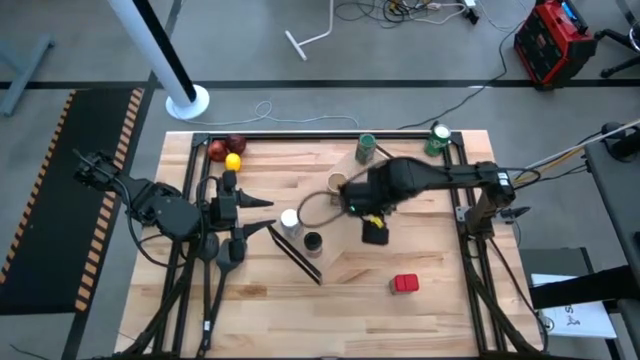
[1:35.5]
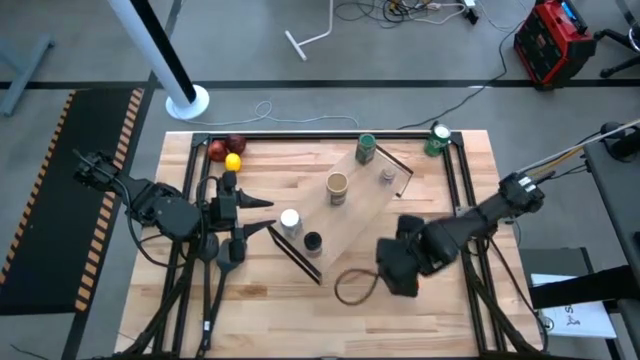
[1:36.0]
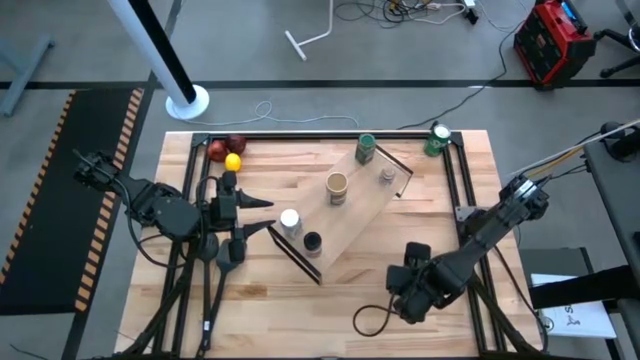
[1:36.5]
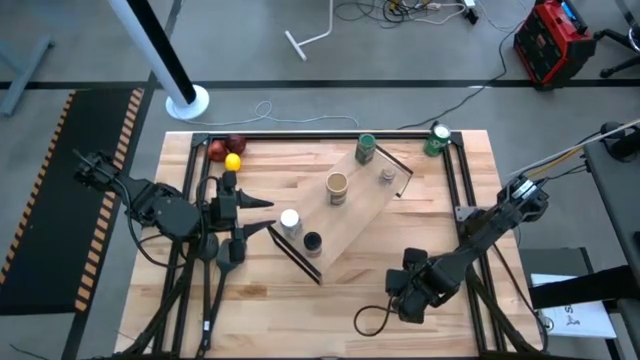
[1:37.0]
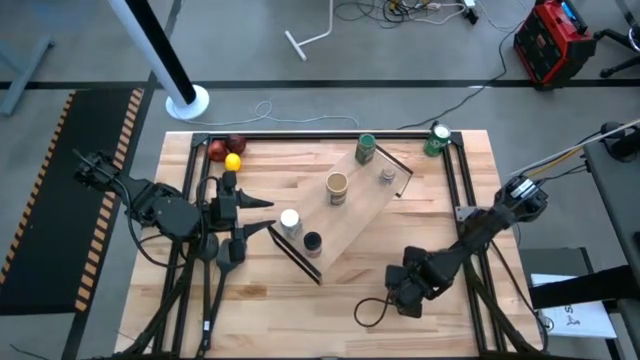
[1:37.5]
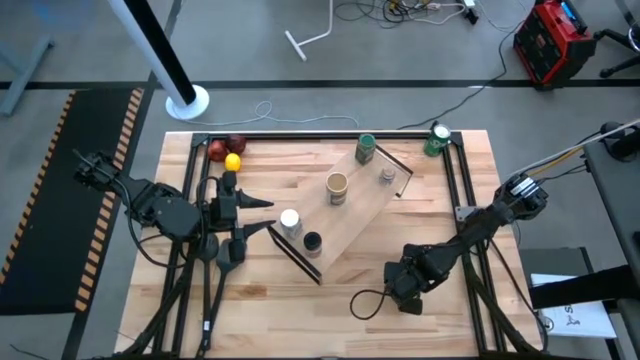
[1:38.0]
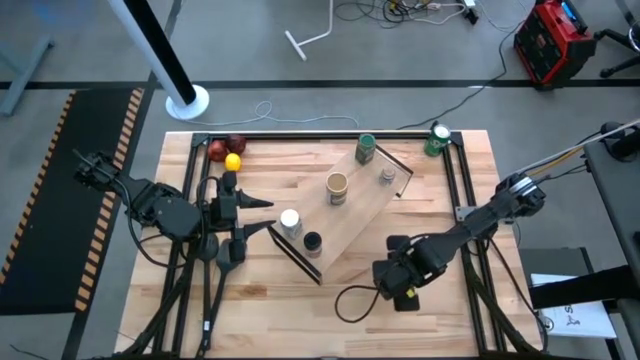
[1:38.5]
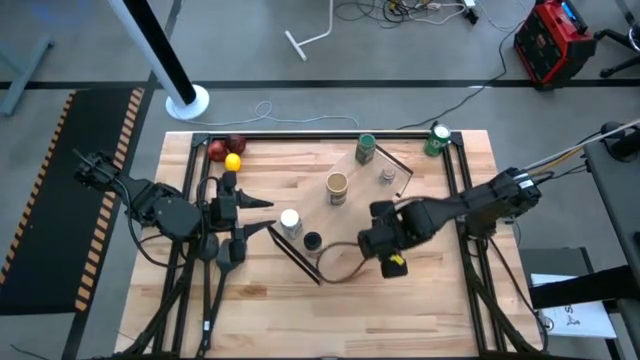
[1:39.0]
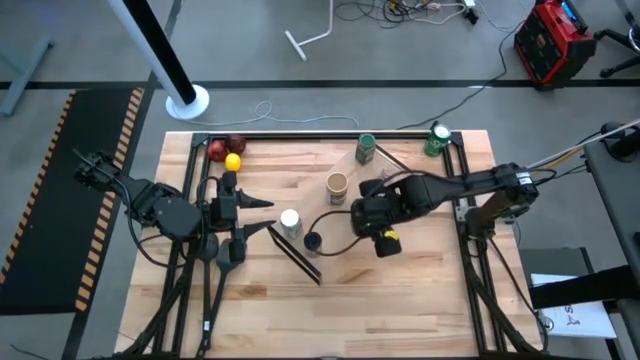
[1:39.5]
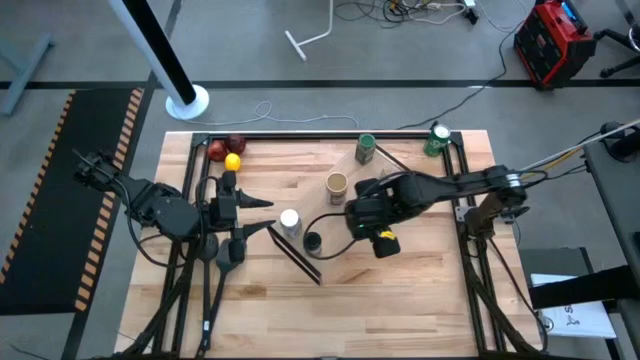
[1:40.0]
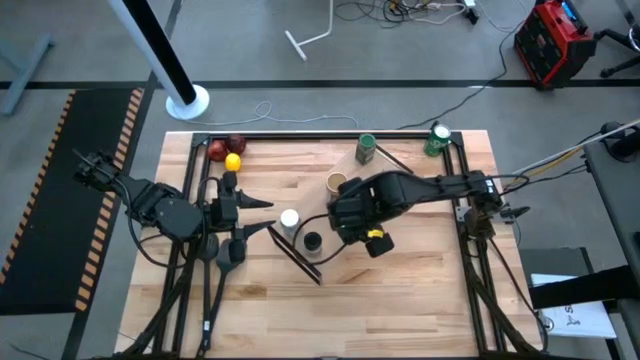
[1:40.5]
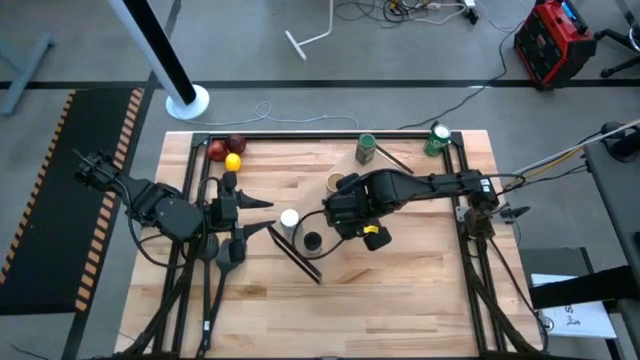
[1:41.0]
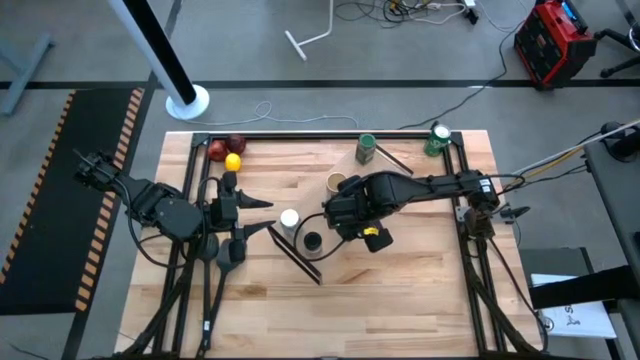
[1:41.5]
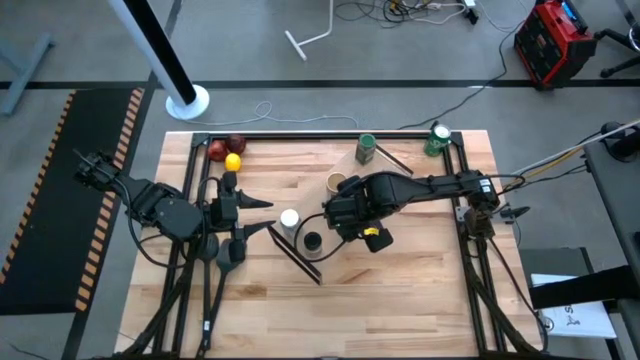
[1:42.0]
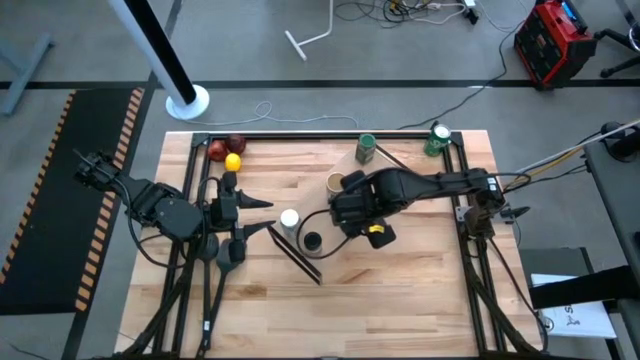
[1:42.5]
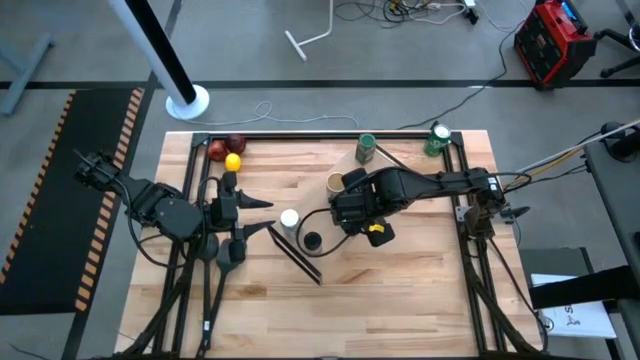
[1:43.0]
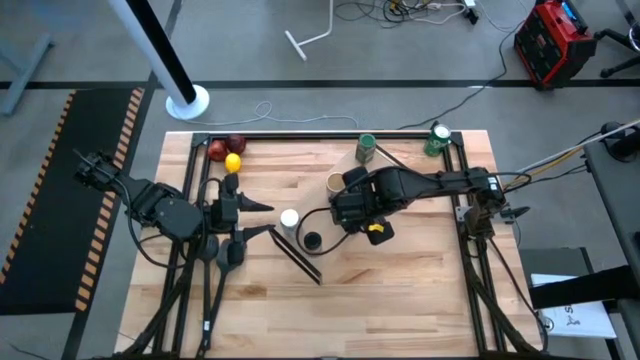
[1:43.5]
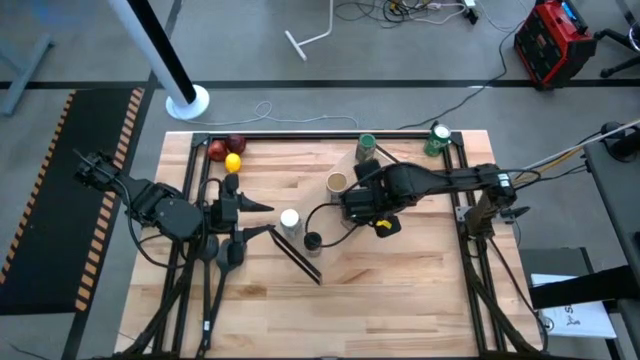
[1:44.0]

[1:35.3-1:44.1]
Task: Shelf spices
Put the red seasoning can on the shelf aligned with the golden seasoning bottle

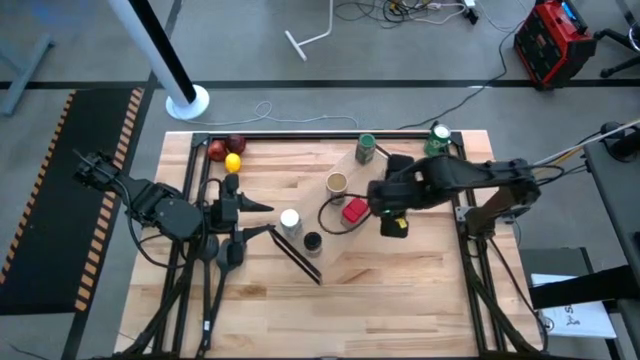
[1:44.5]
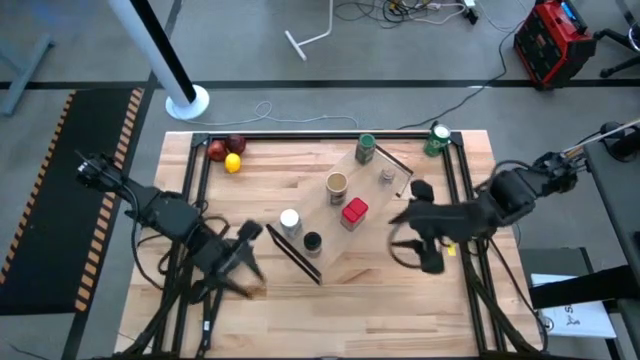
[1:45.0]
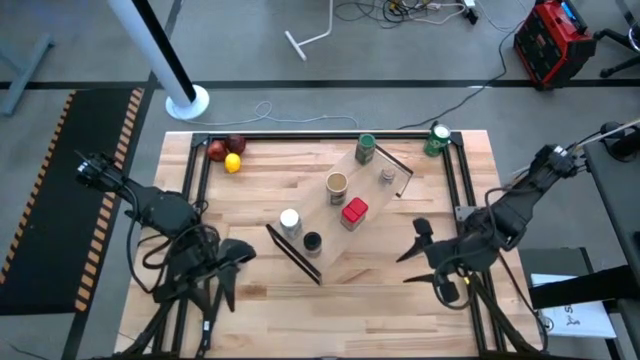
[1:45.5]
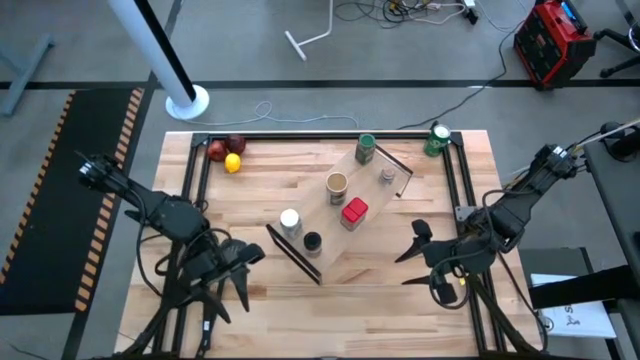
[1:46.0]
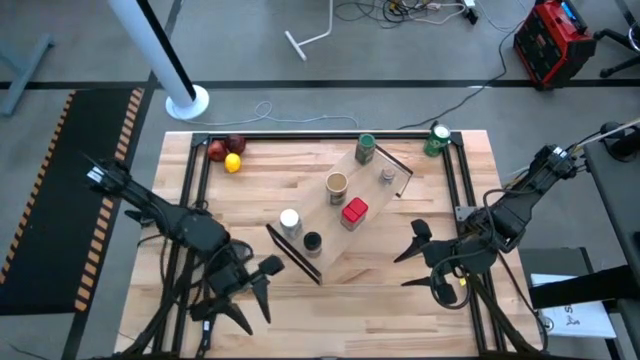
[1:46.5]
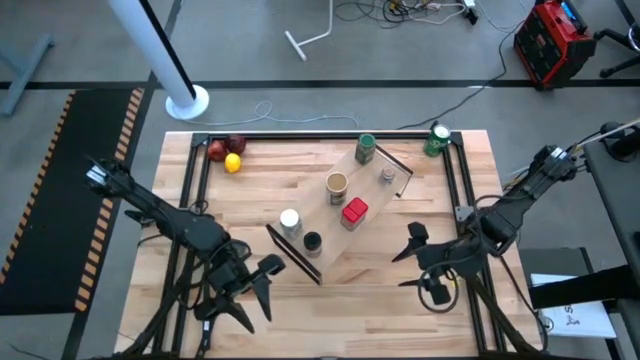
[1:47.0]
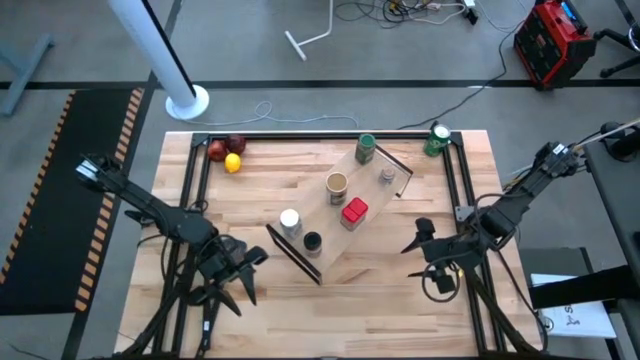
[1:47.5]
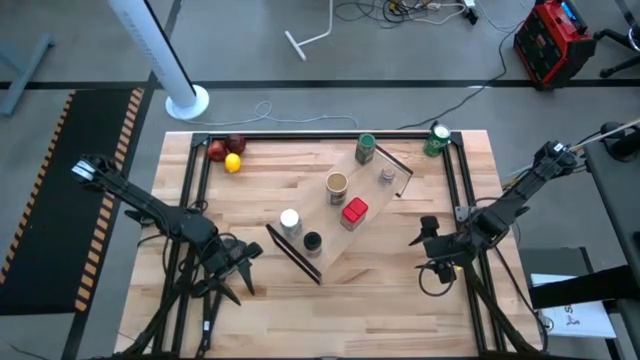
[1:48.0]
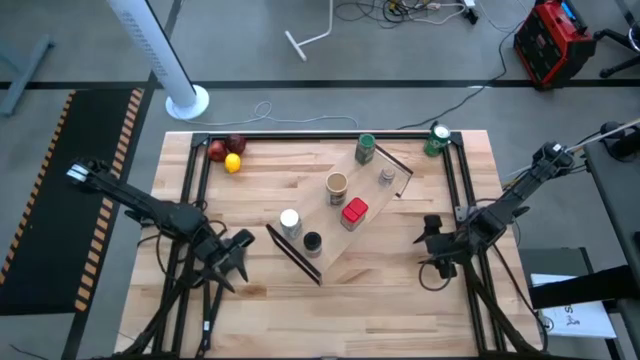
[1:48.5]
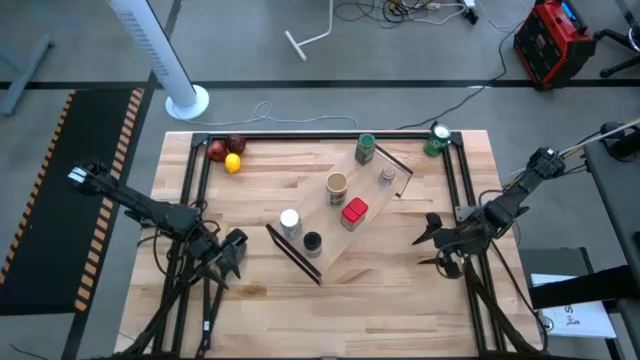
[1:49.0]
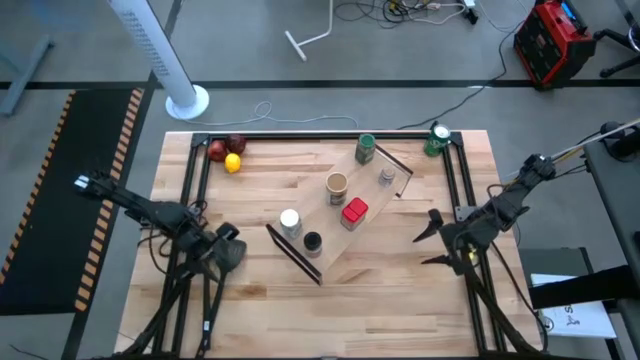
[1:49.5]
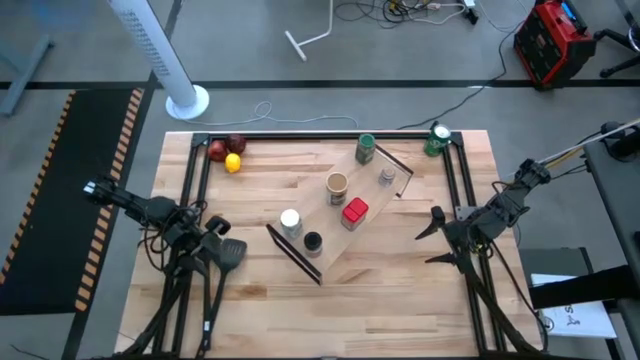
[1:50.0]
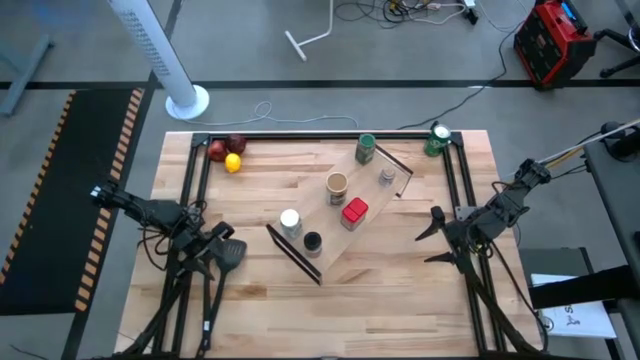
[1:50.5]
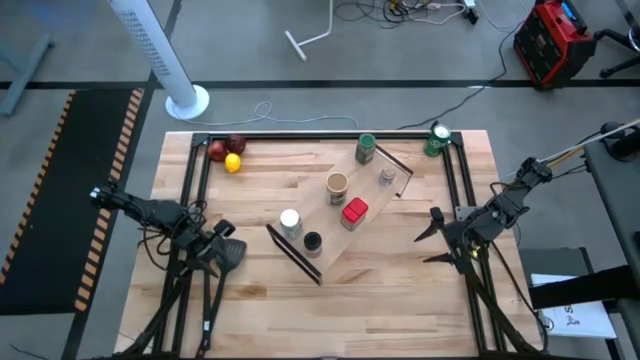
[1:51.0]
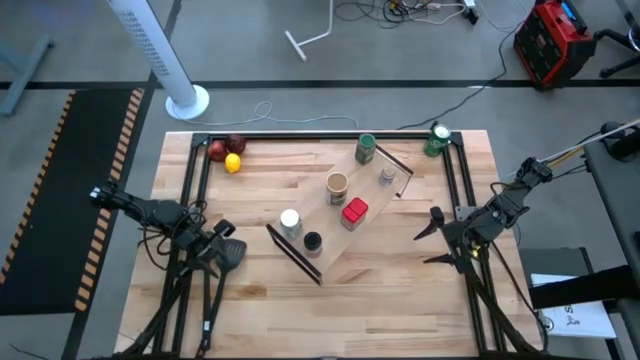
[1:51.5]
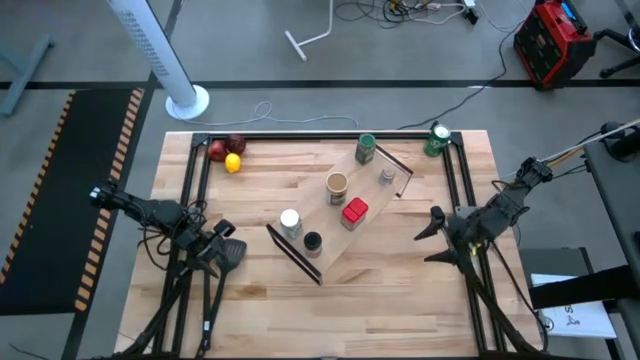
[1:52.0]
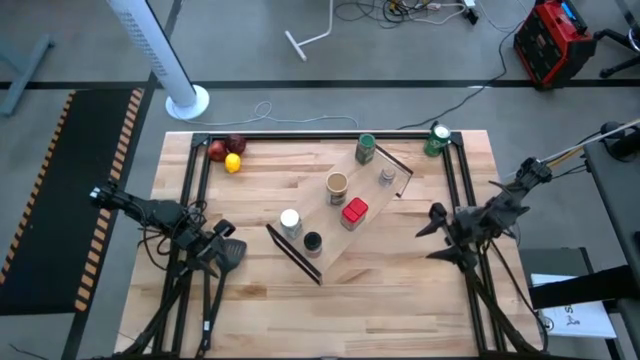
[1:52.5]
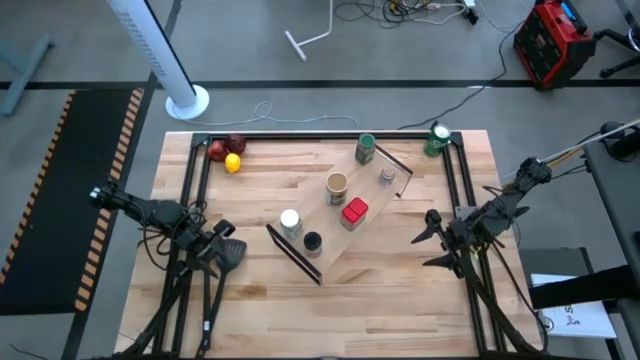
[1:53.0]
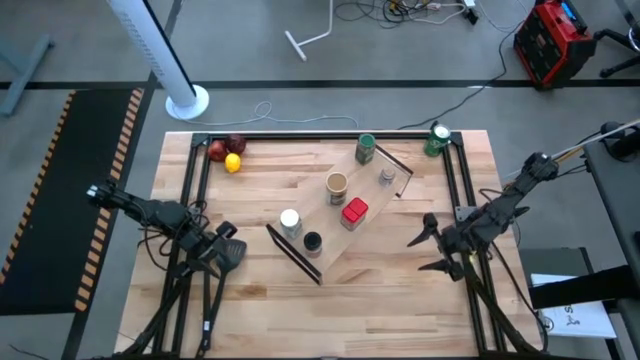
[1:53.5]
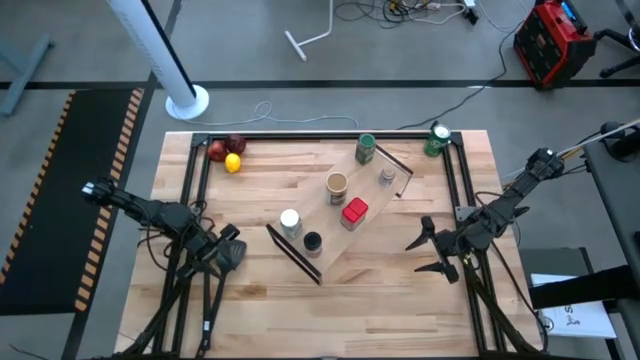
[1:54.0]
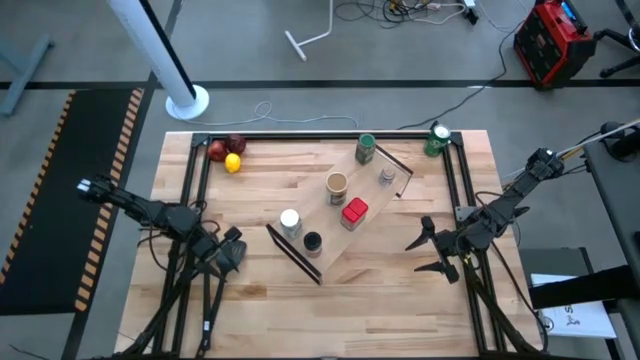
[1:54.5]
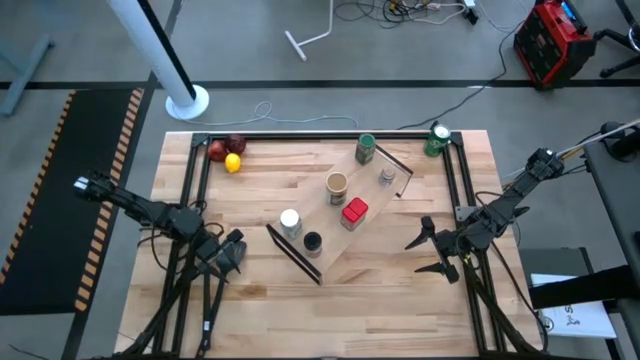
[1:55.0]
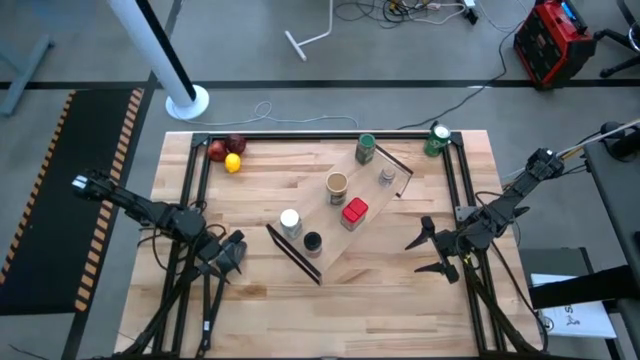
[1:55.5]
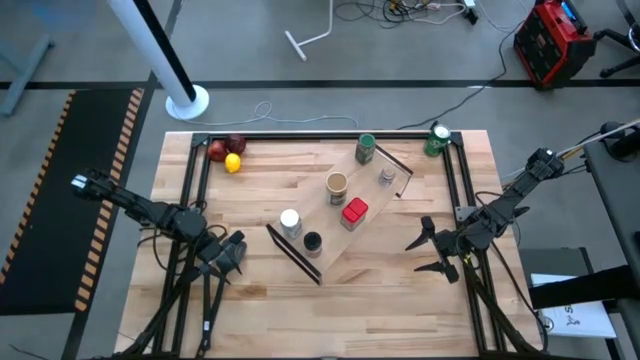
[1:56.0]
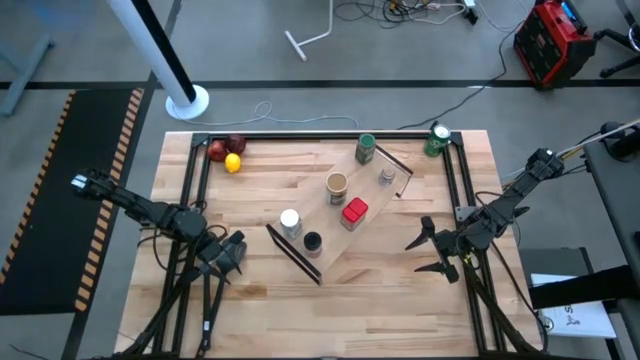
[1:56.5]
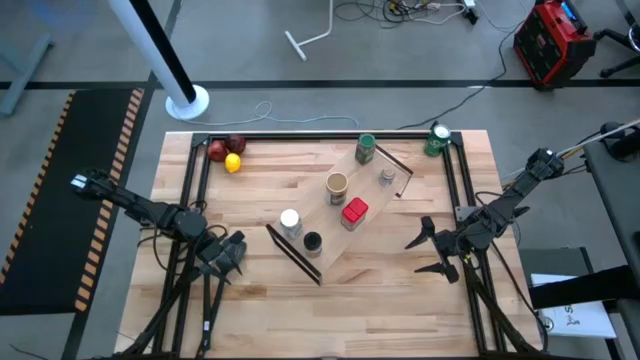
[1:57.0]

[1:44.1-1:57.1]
Return to Home Position
